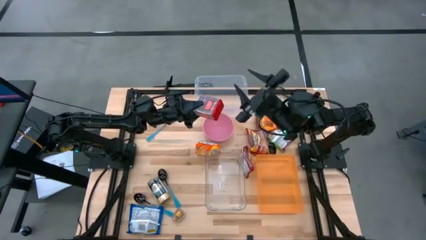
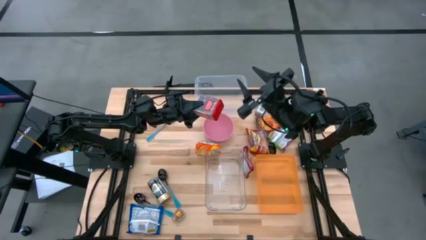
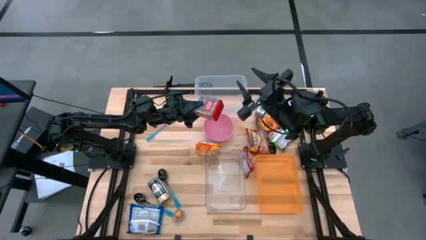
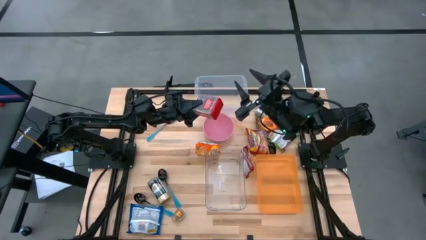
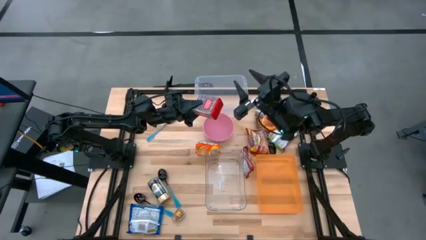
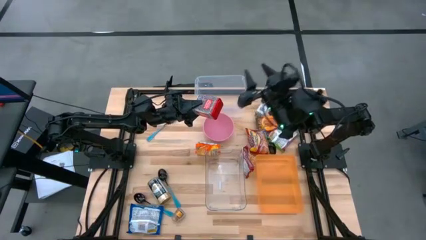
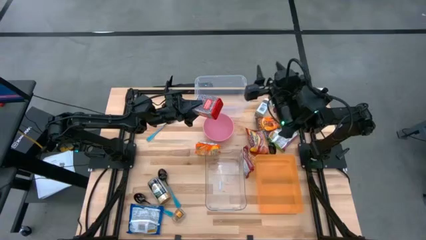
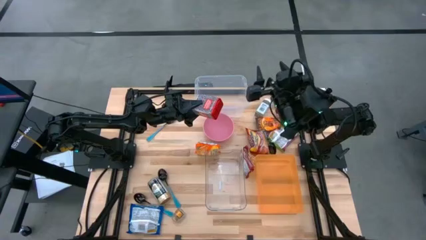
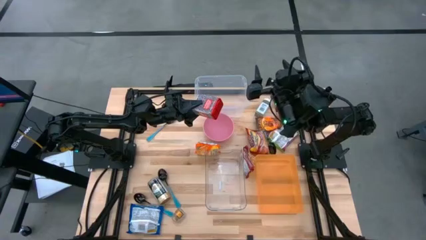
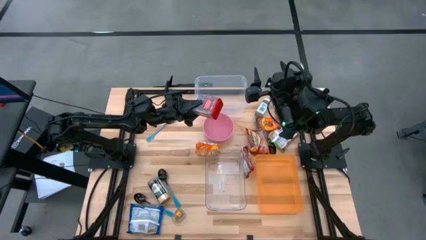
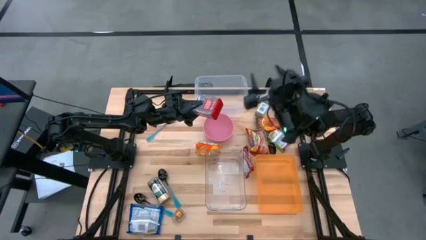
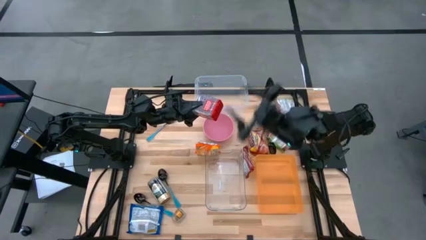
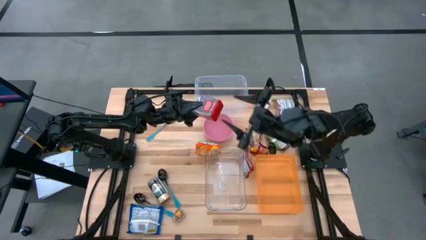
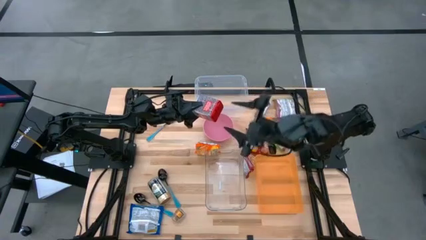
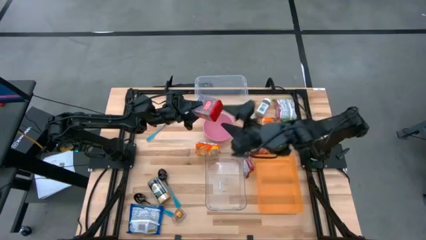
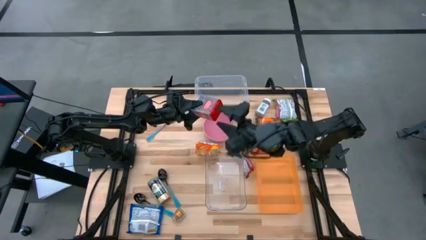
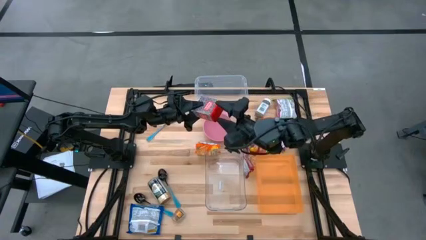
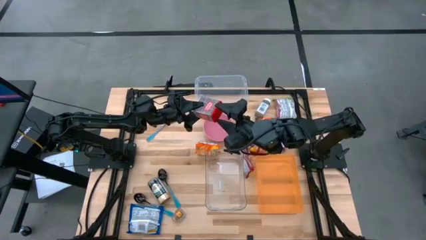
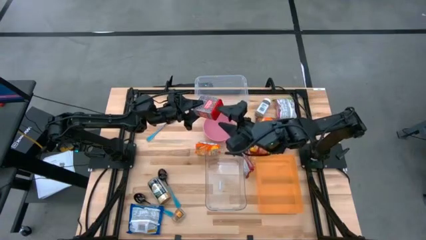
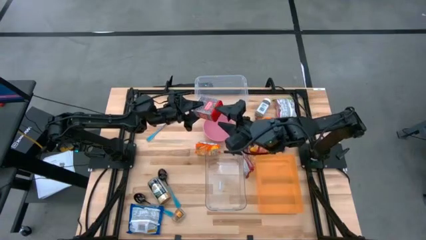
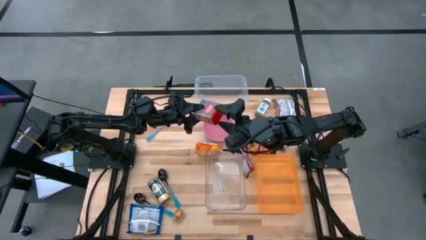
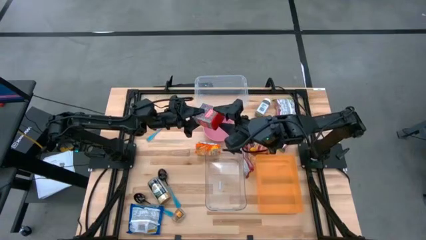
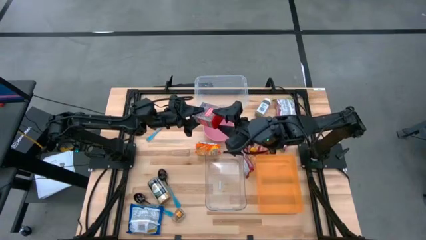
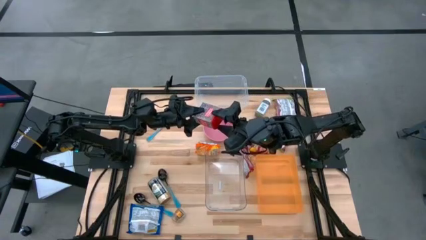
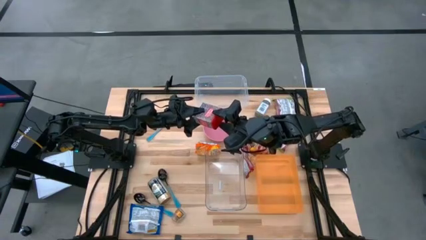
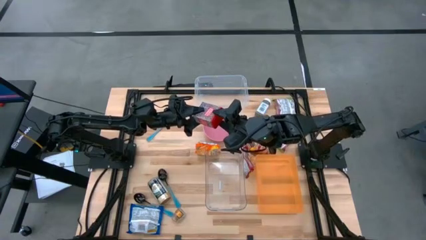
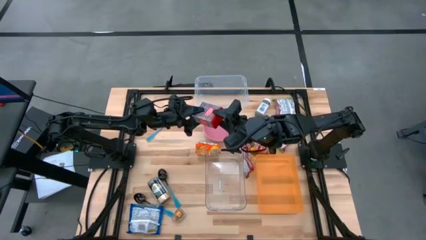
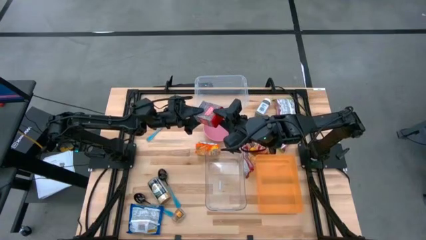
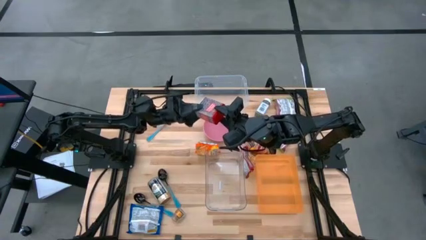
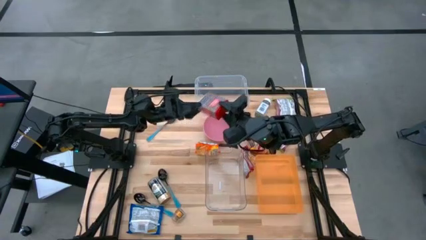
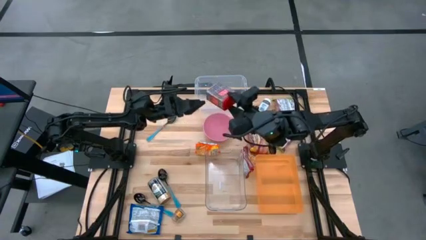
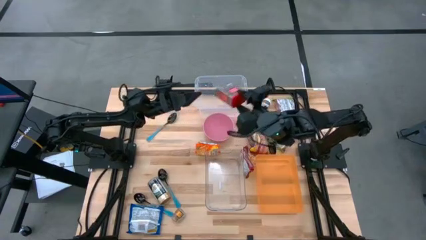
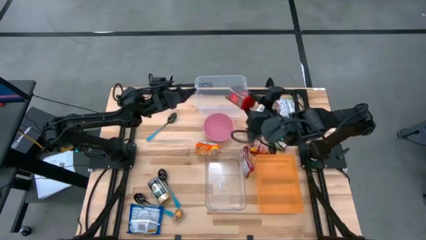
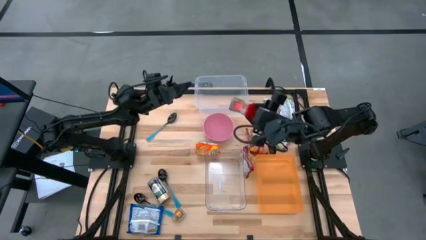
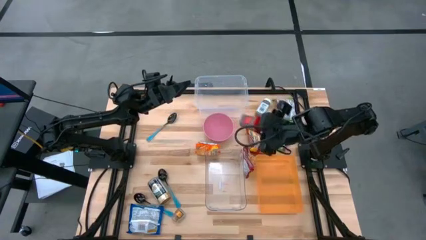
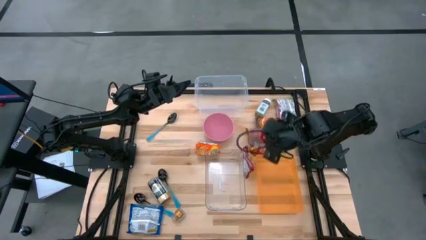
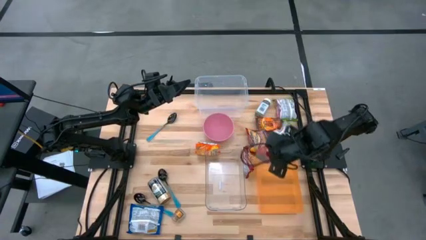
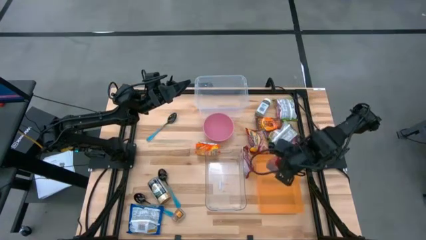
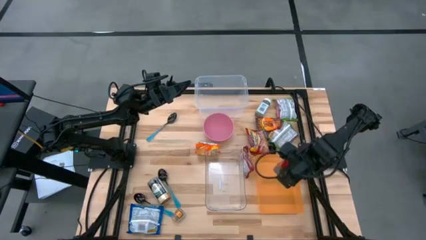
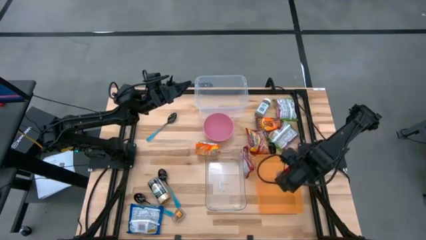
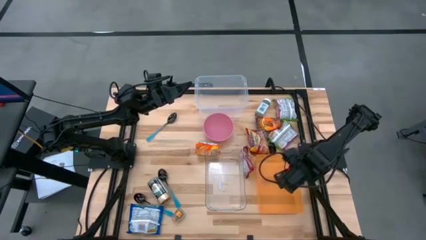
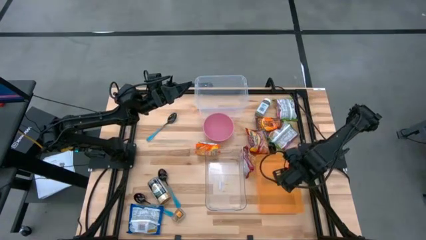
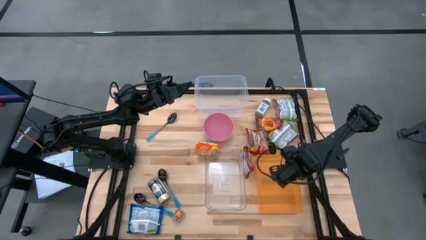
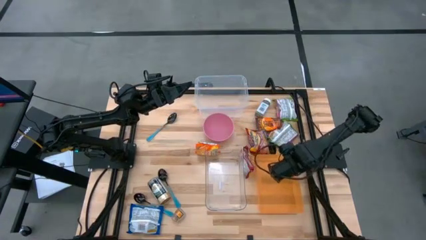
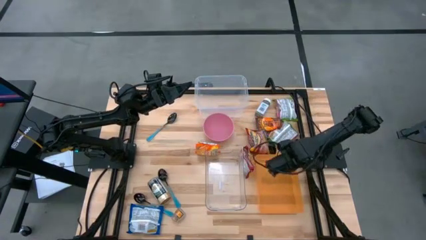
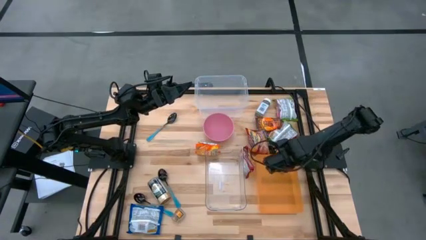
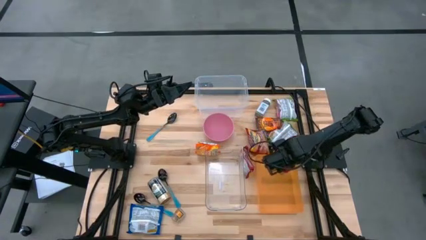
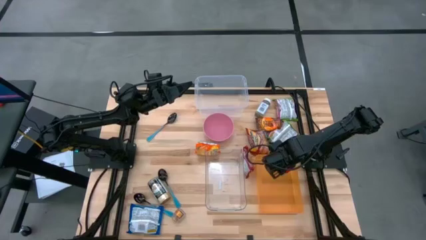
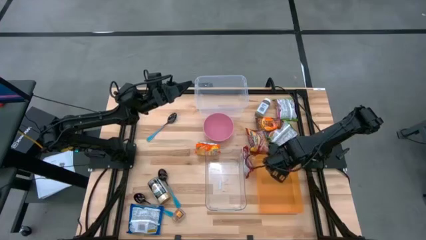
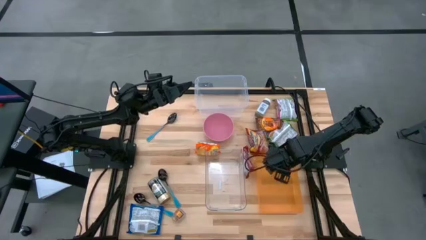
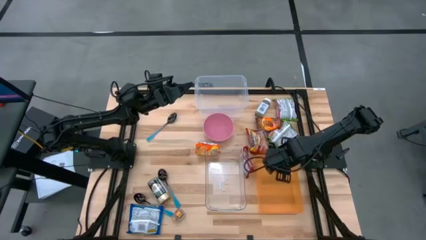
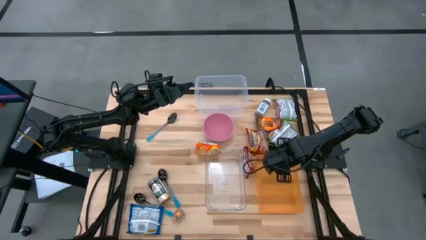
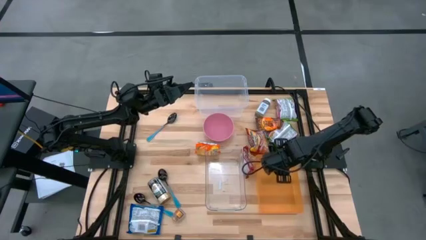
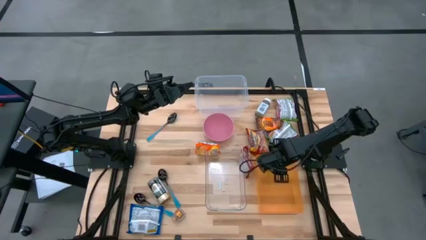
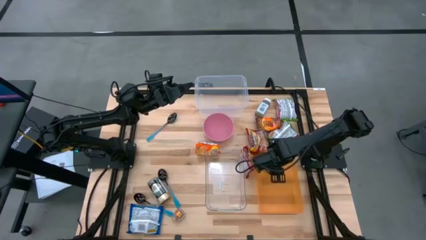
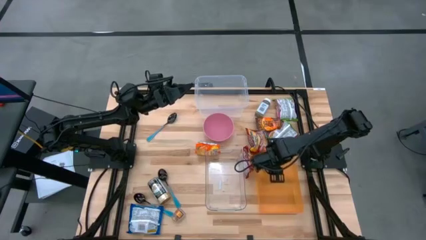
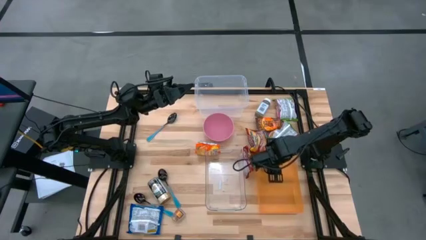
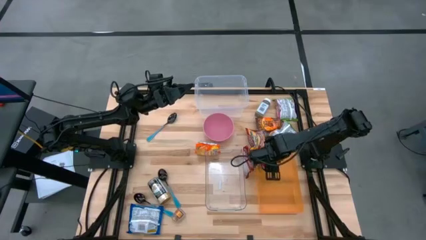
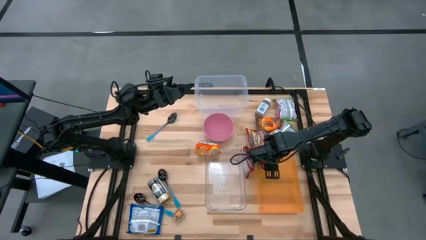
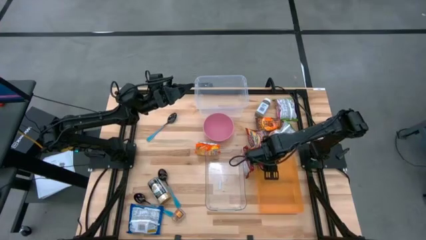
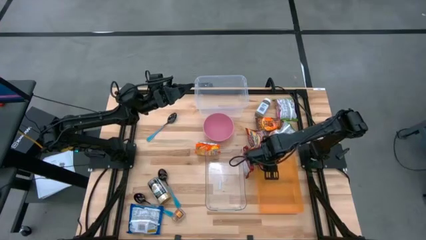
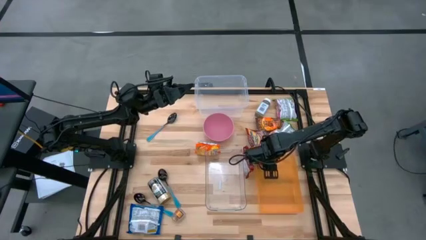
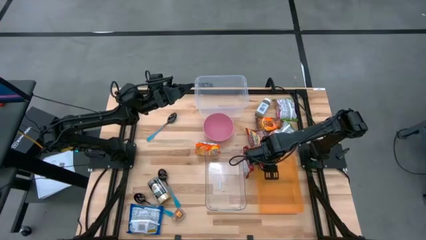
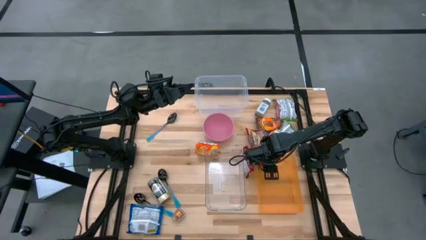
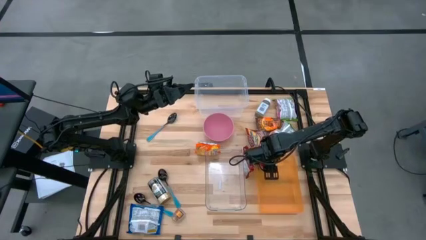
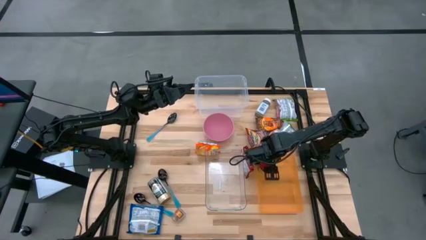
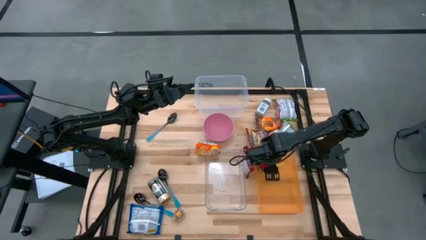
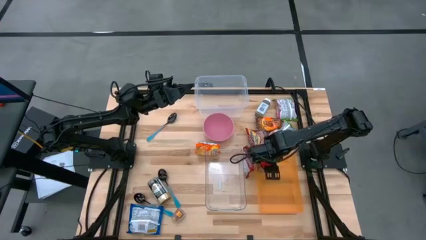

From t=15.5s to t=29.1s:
Task: Pick & Place Food Item
Put the red seasoning can into the orange bin

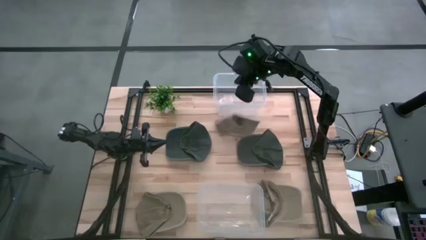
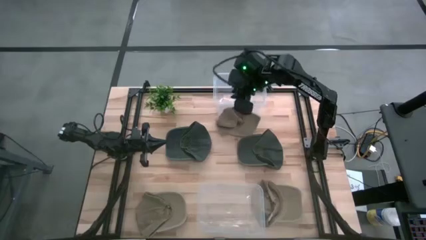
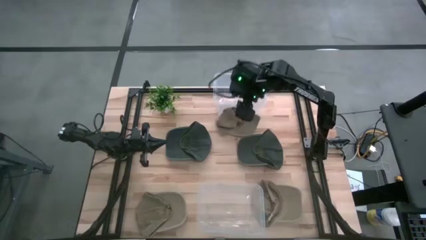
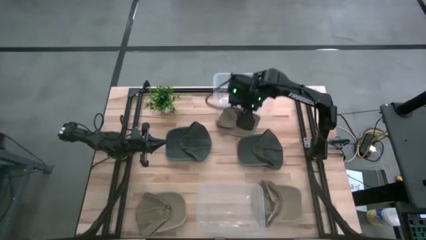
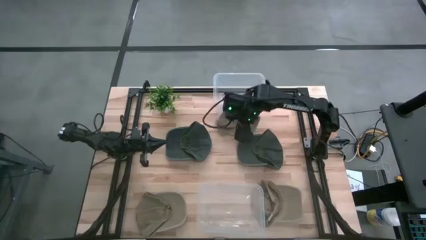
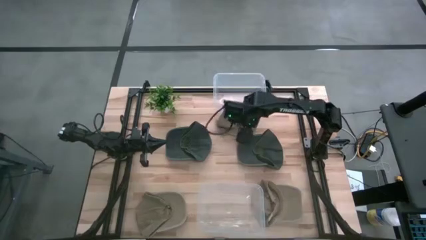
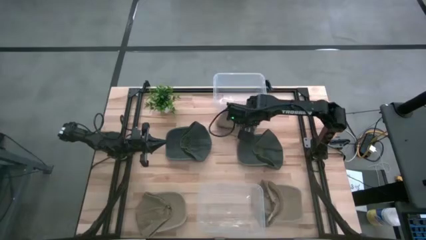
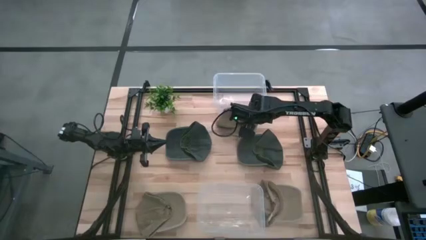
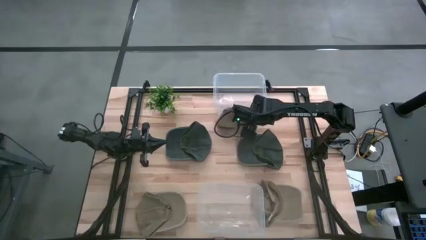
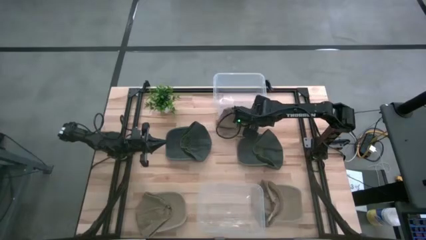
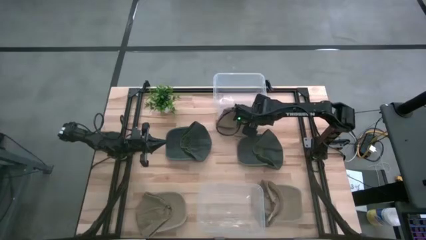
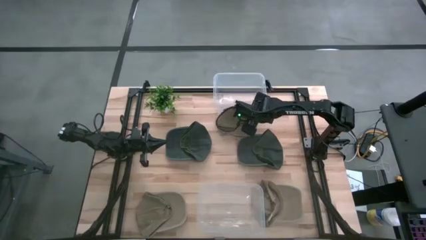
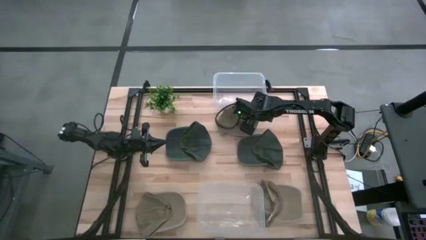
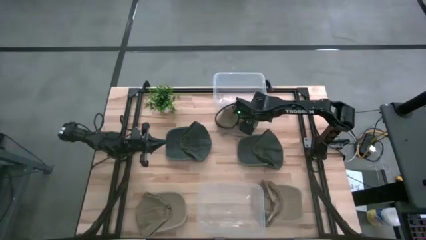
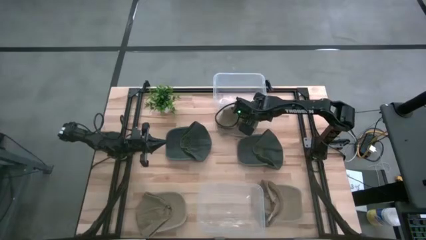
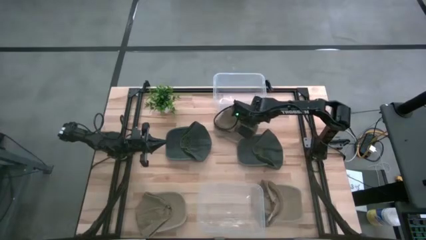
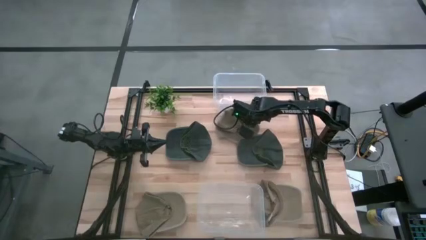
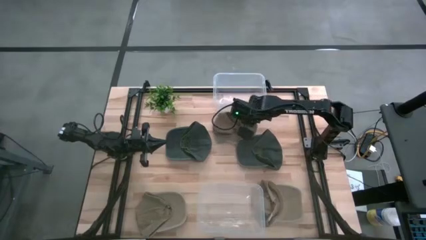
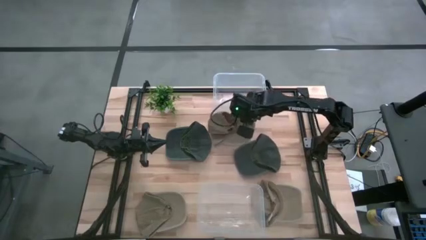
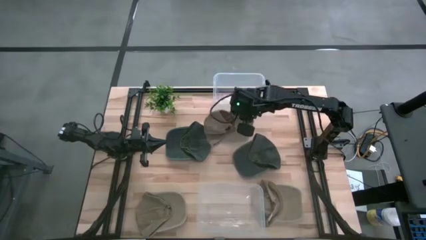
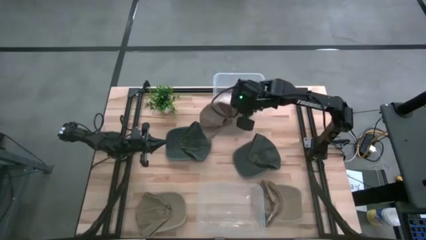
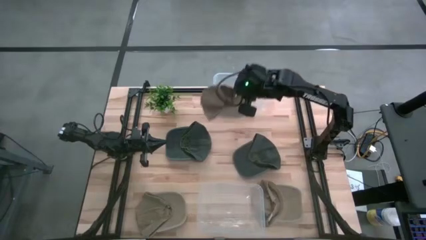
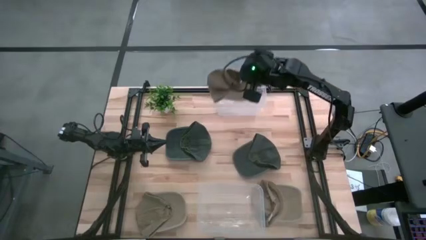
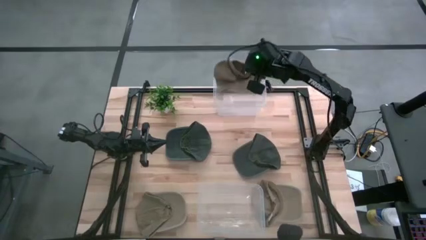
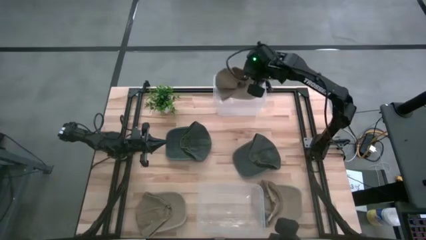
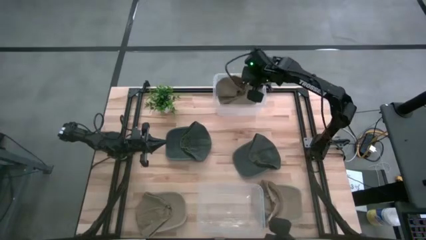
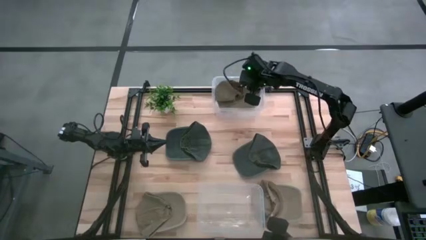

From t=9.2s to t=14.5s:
Task: Pick & Place hat
Put the top brown cap into the top transparent bin
